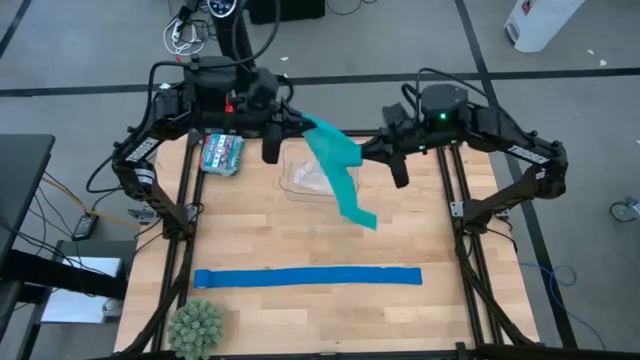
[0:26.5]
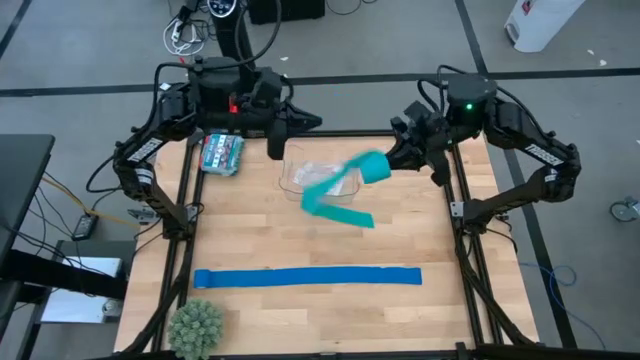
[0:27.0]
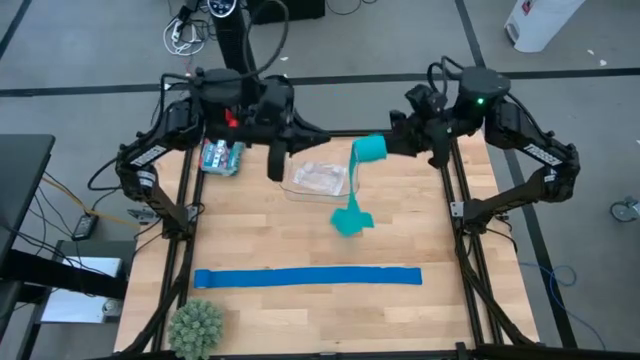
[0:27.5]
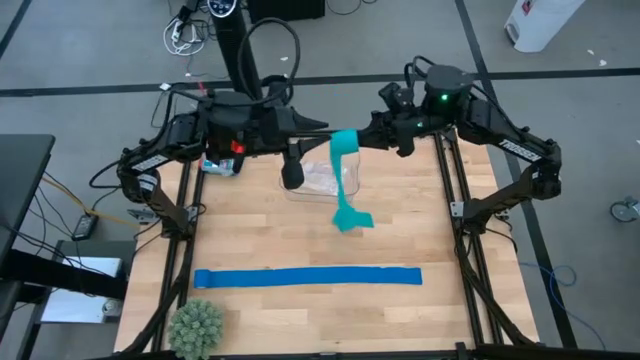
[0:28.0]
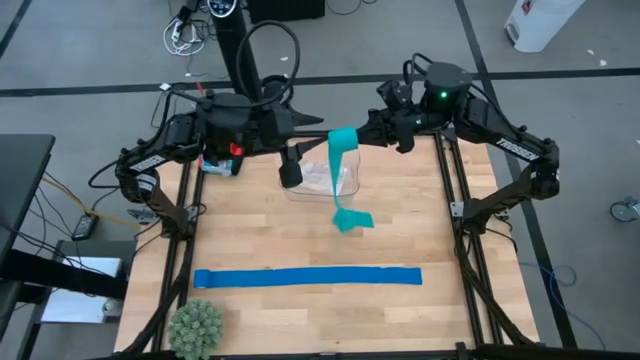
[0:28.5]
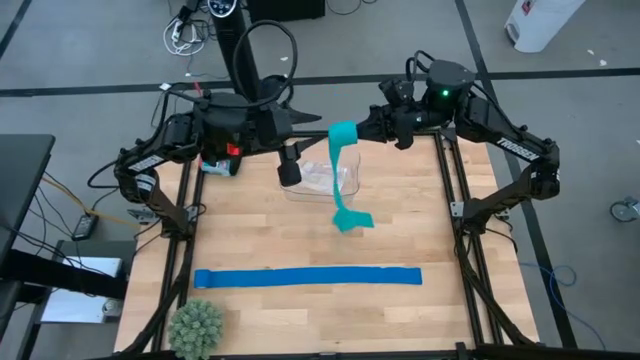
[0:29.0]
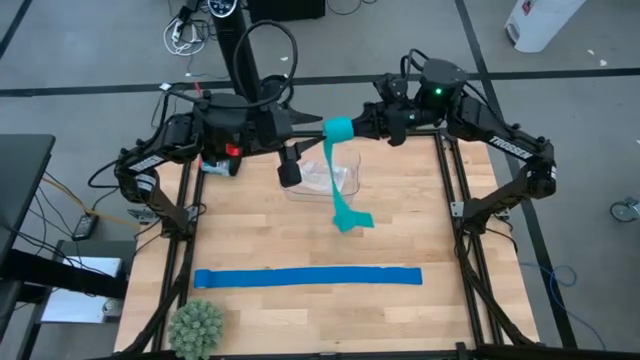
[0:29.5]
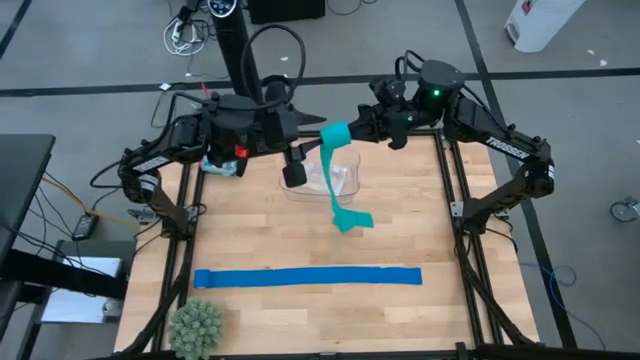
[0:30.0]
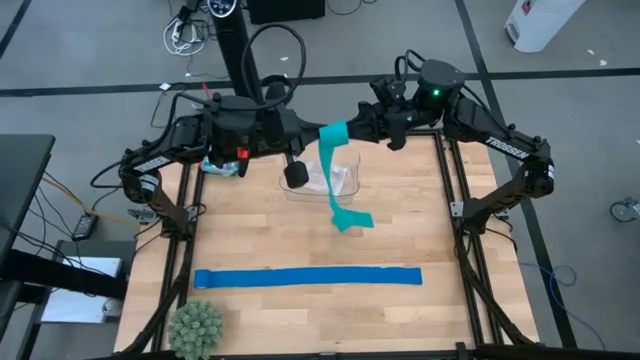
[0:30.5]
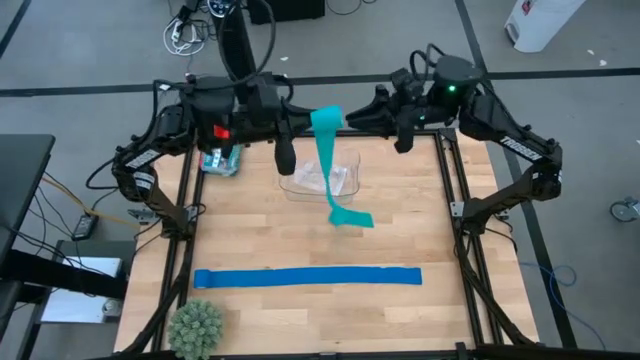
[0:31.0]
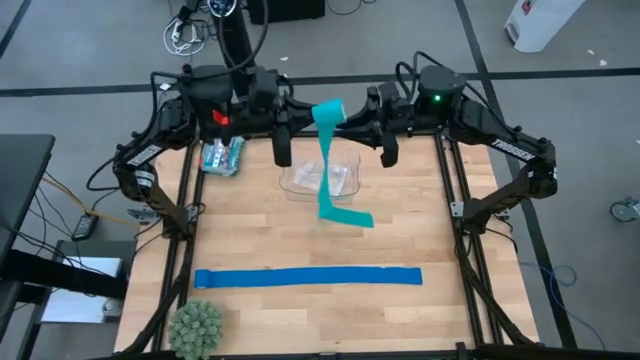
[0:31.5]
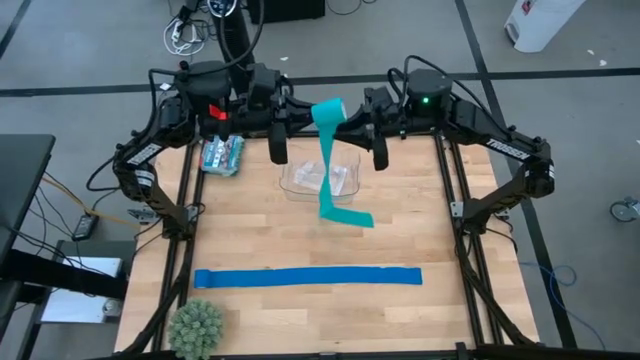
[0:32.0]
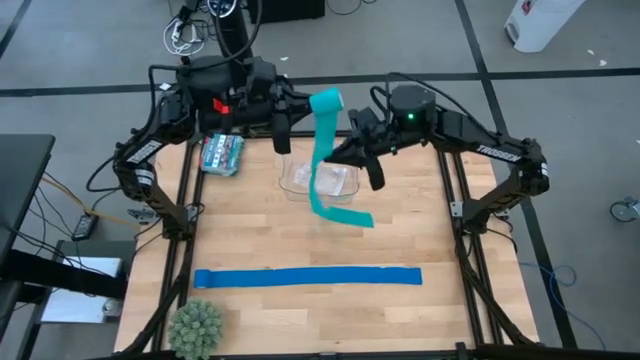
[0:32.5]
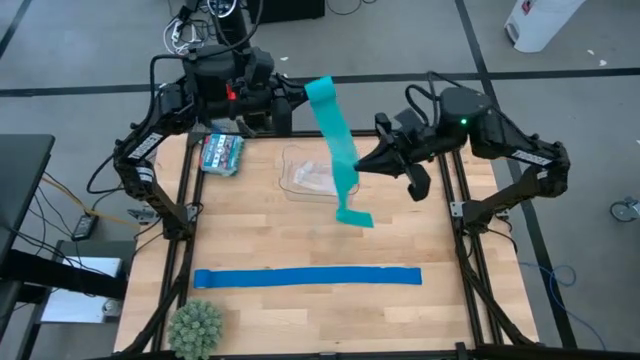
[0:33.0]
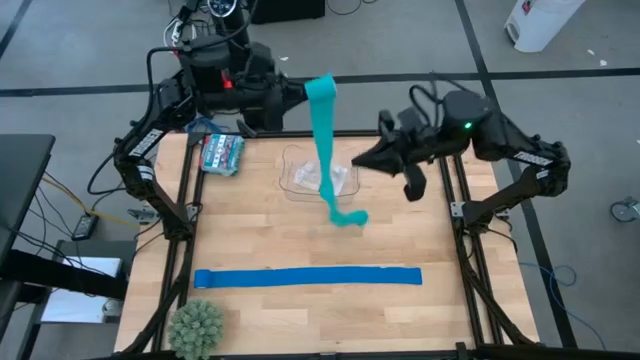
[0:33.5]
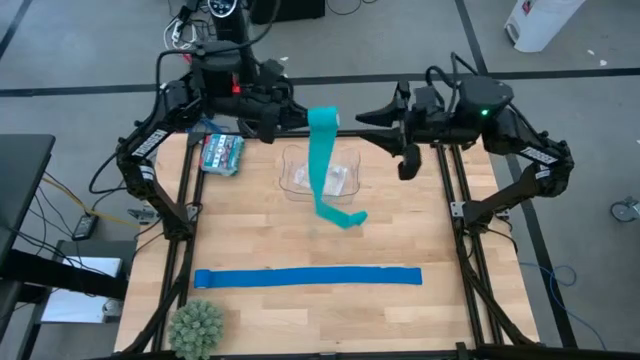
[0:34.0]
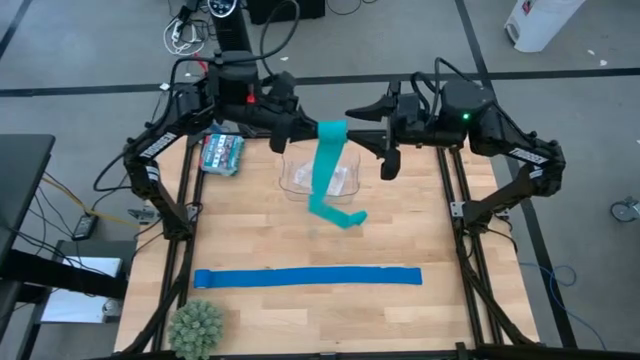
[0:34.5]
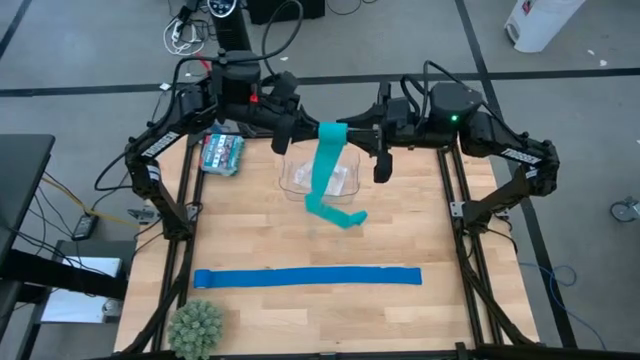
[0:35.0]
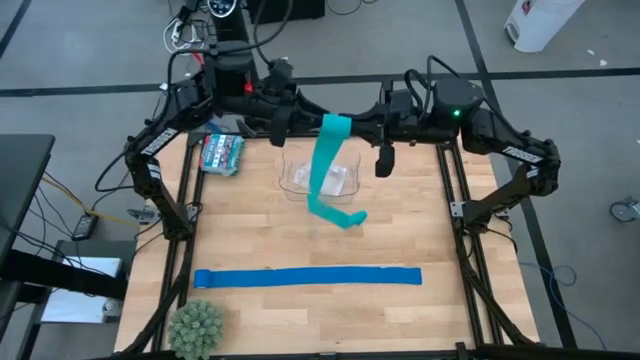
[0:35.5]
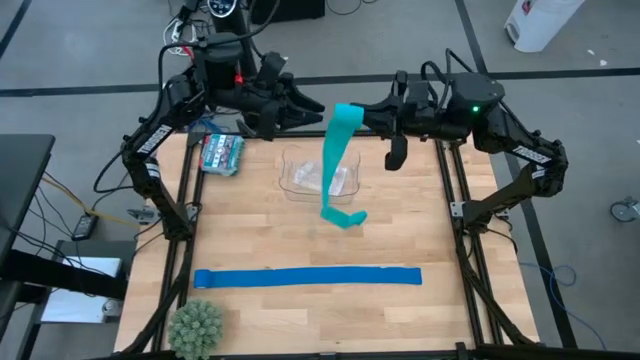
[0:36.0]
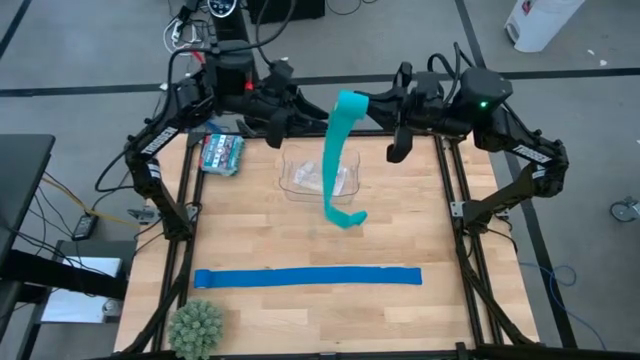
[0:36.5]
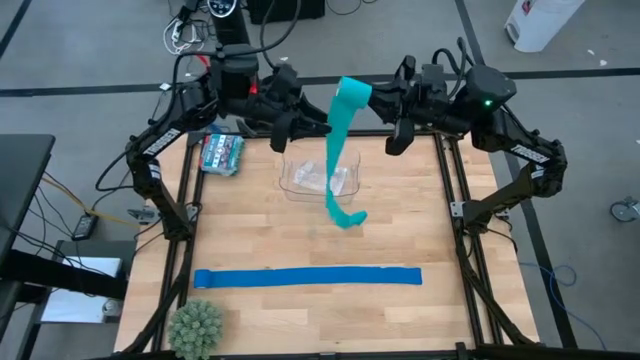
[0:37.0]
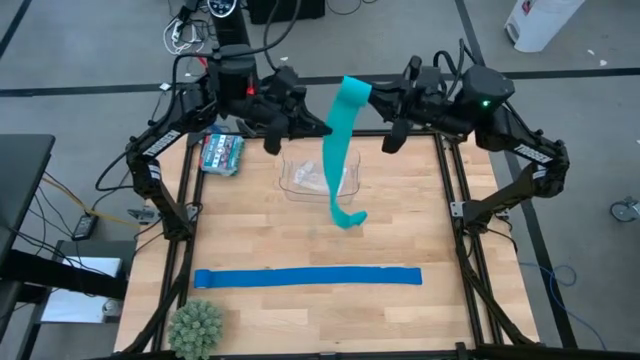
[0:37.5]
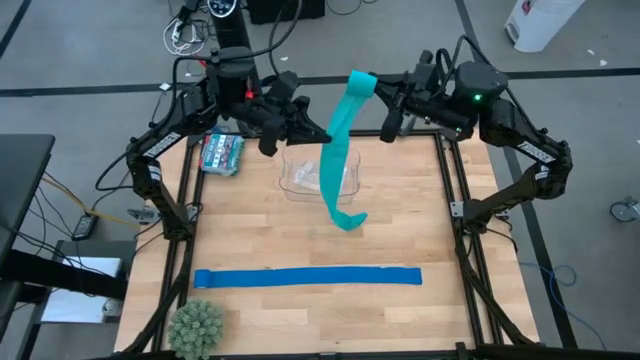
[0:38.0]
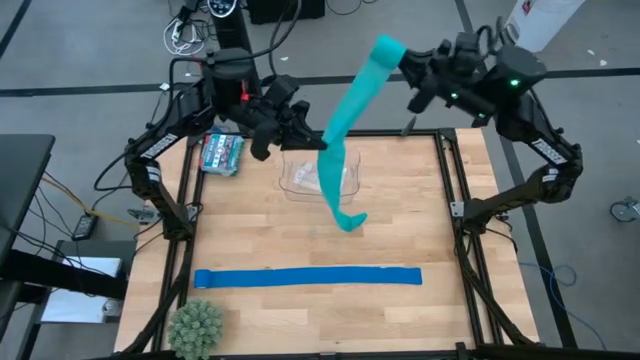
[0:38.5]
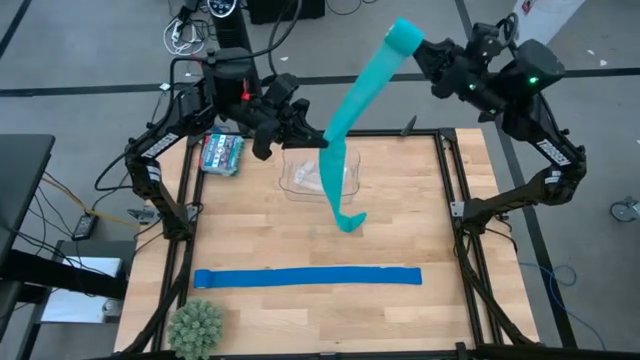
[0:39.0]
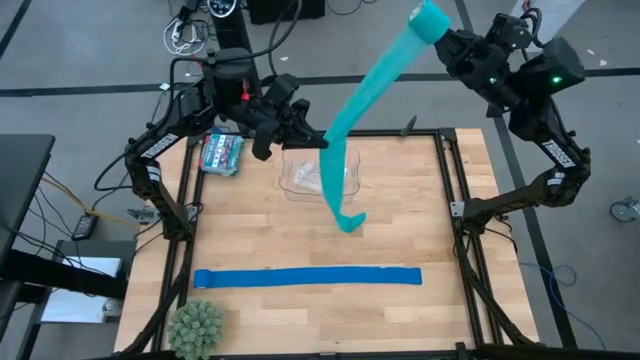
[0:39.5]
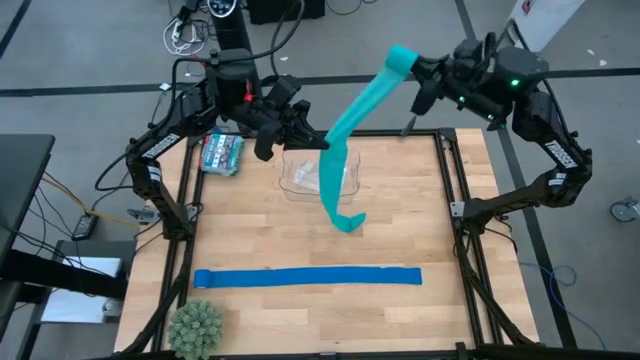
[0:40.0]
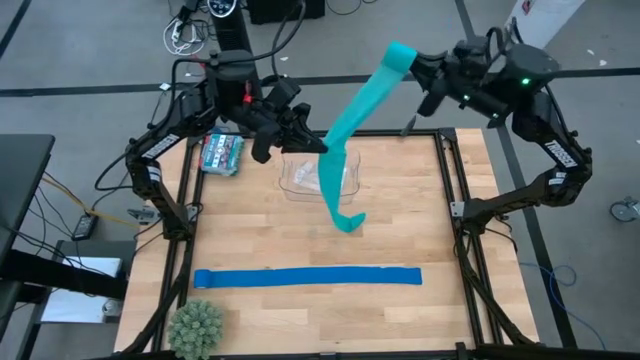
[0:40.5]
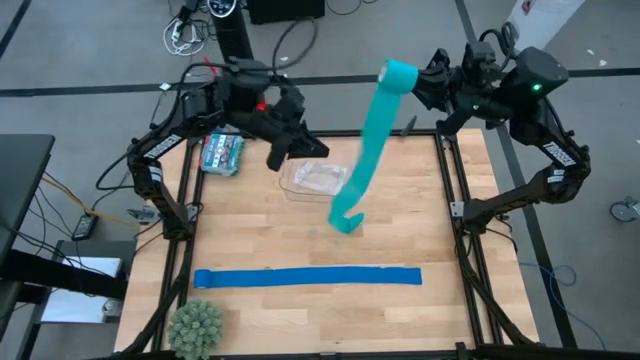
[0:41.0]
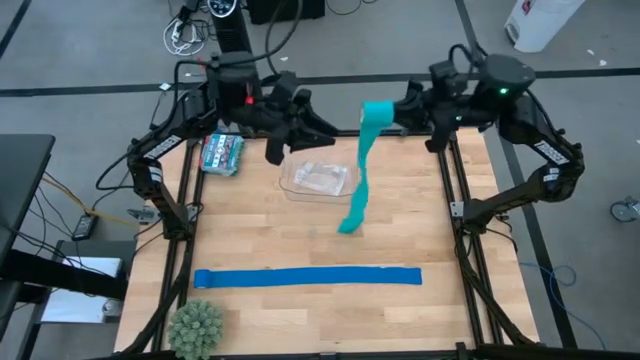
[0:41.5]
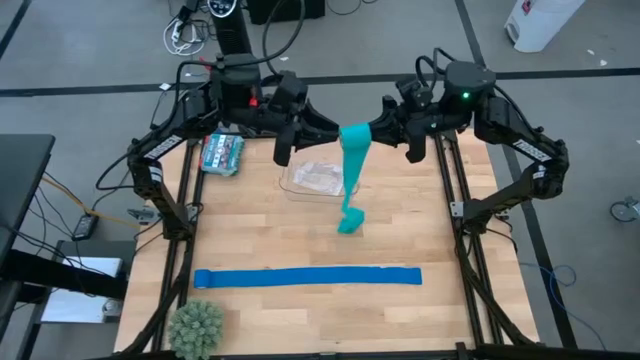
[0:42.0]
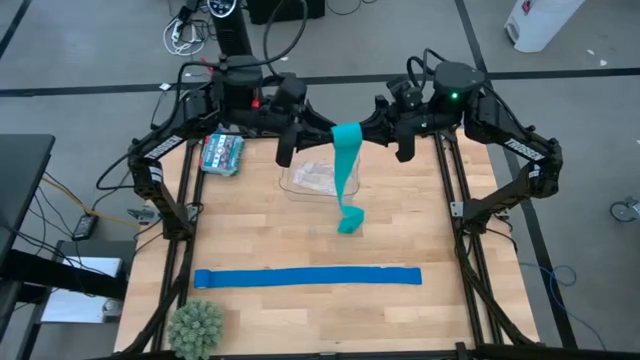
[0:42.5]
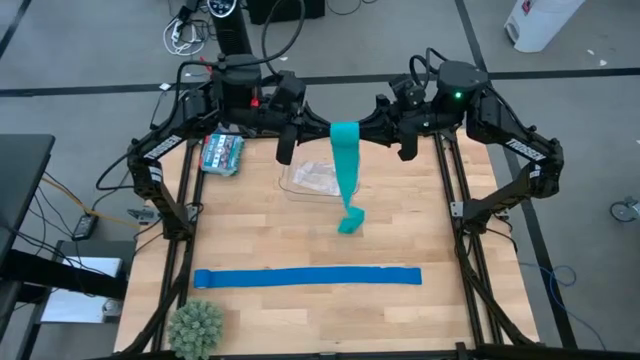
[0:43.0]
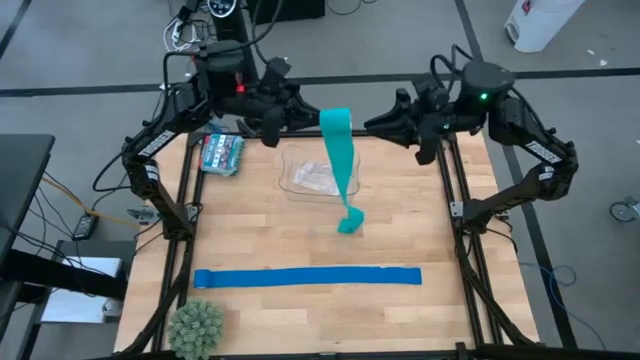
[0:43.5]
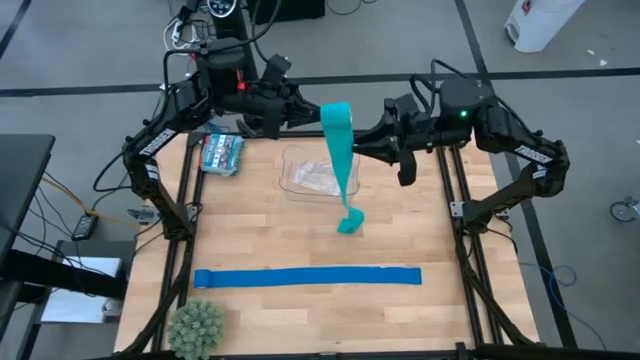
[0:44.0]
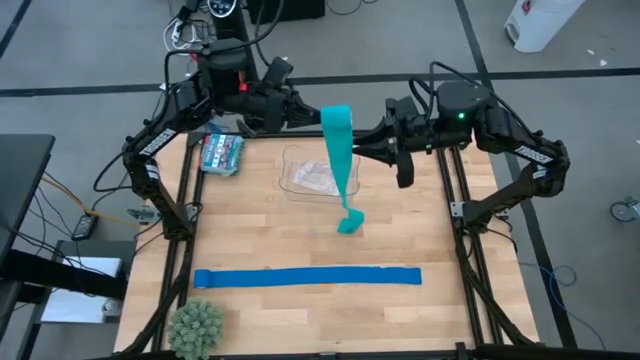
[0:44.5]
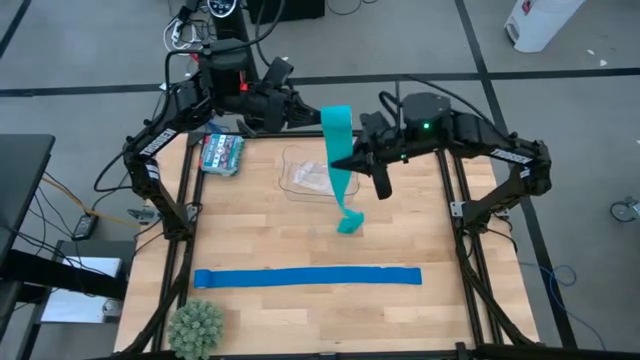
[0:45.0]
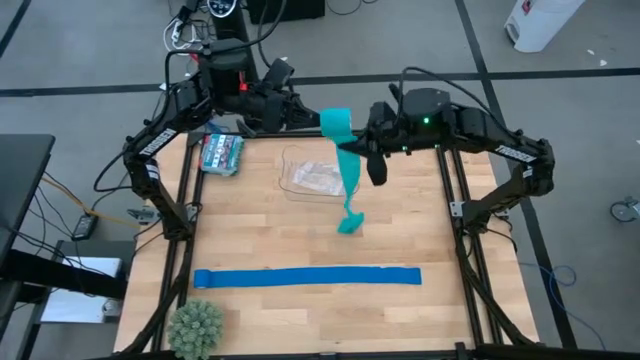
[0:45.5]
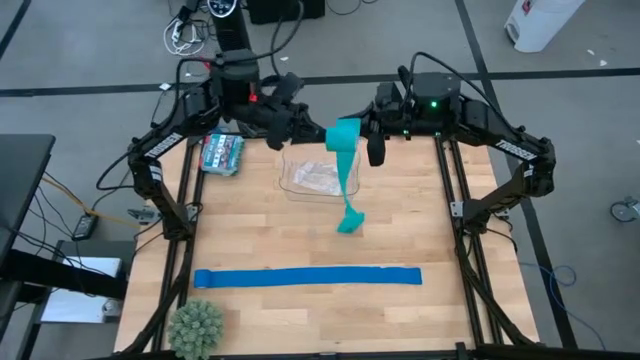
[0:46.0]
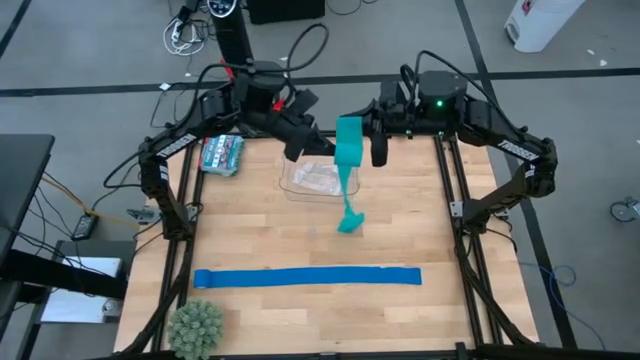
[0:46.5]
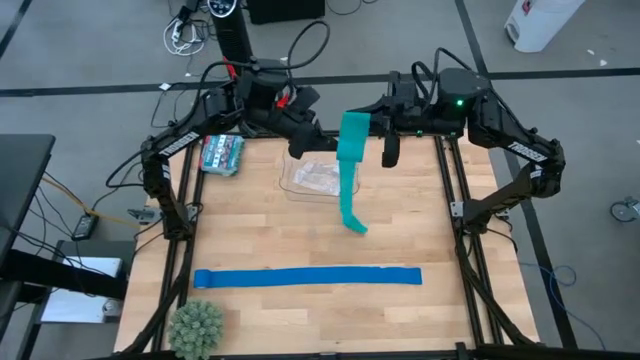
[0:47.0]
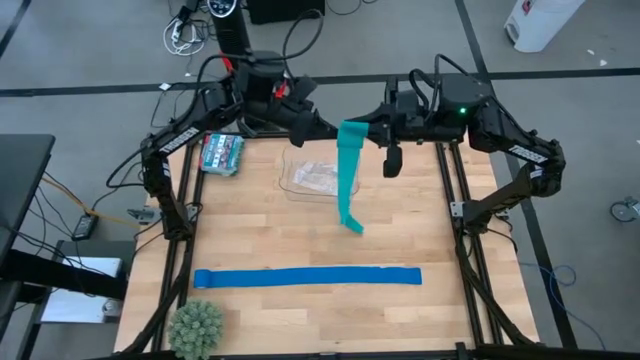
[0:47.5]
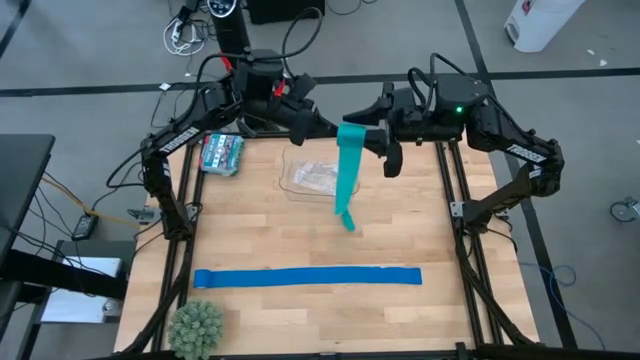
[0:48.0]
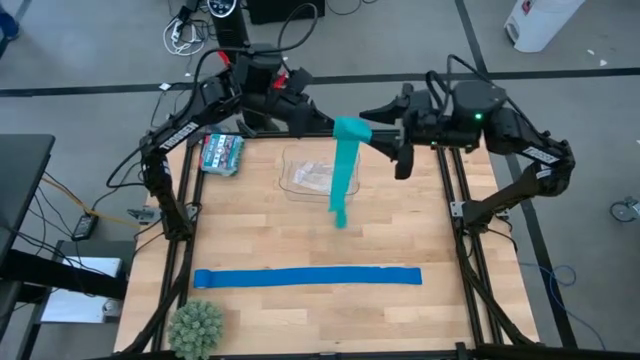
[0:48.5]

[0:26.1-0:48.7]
Task: Roll bandage
Roll the green bandage
